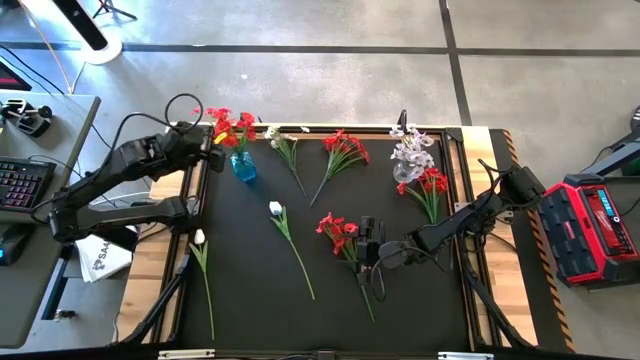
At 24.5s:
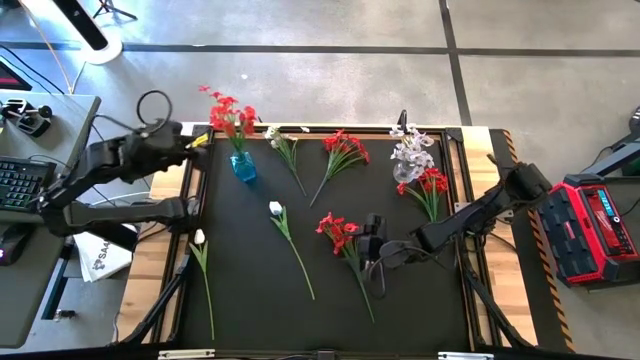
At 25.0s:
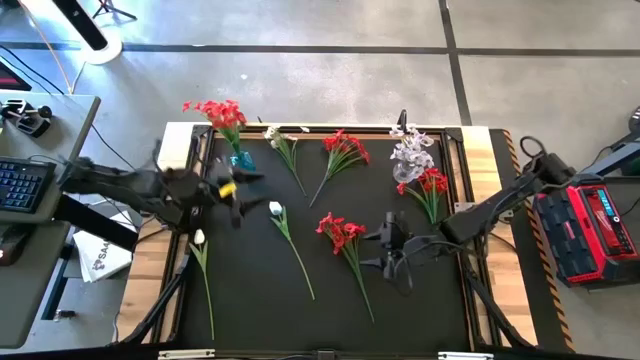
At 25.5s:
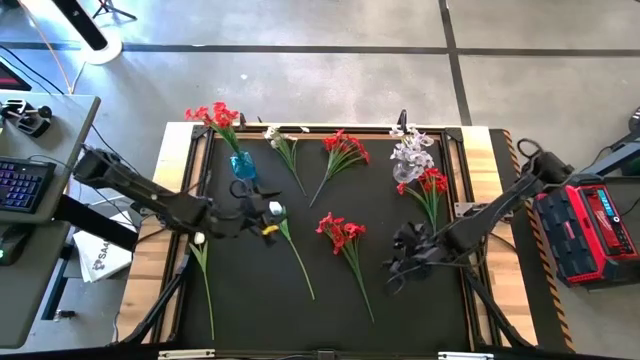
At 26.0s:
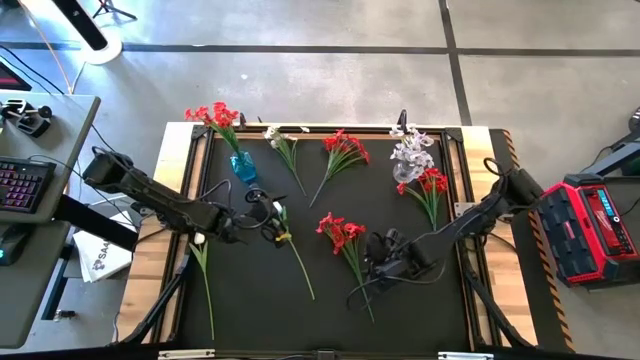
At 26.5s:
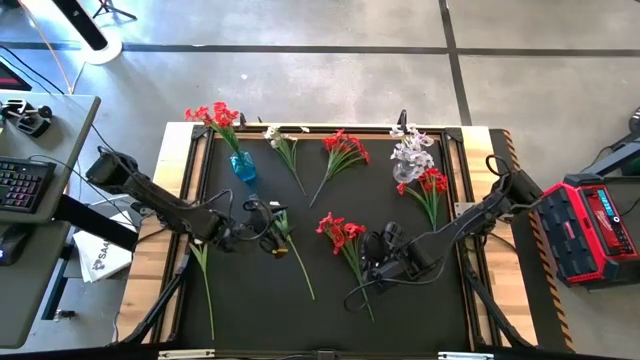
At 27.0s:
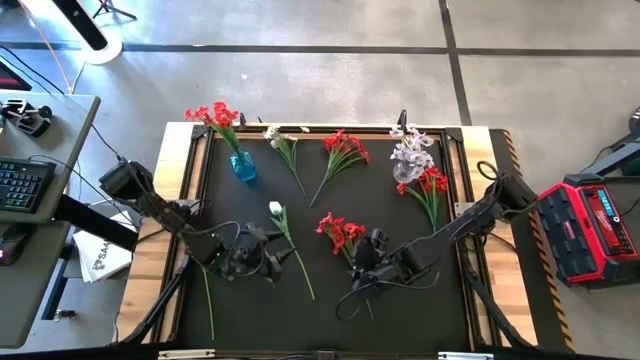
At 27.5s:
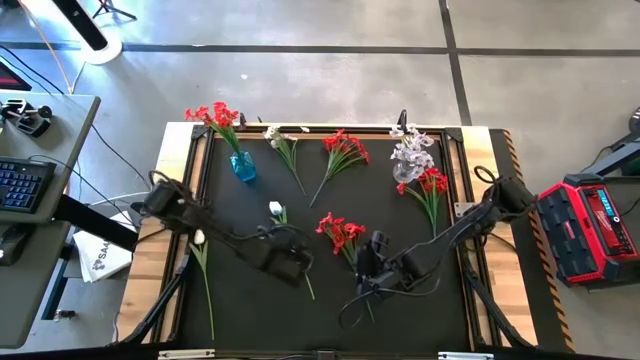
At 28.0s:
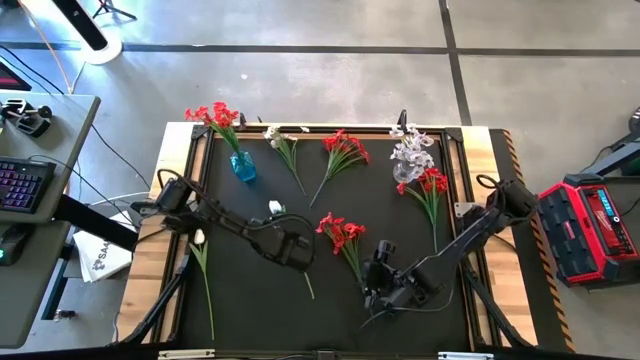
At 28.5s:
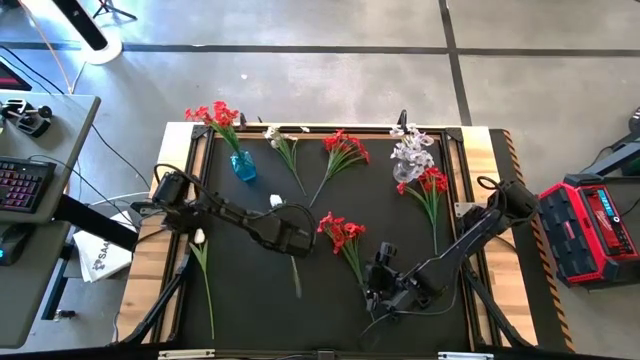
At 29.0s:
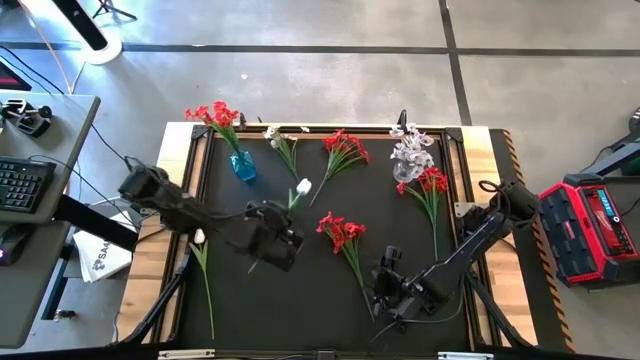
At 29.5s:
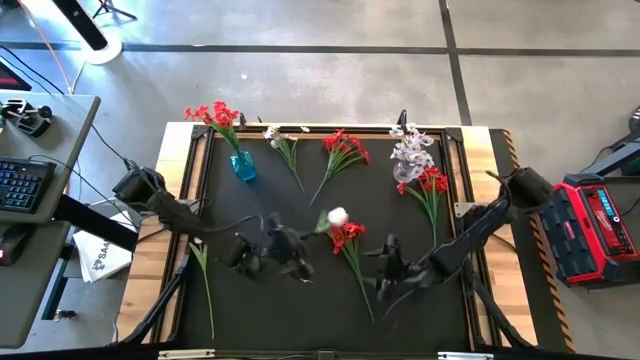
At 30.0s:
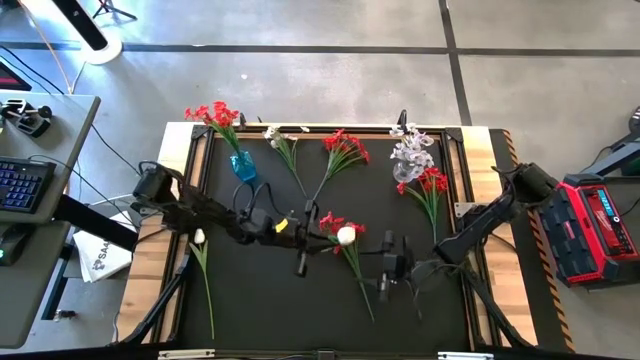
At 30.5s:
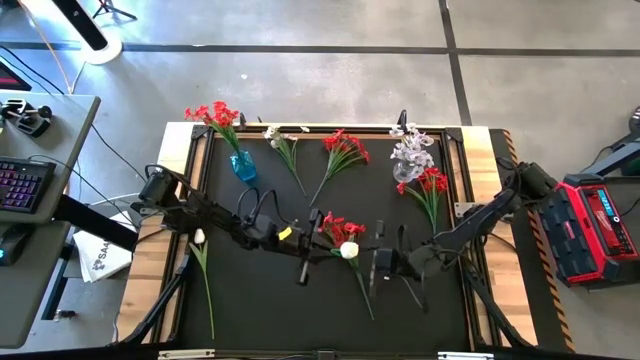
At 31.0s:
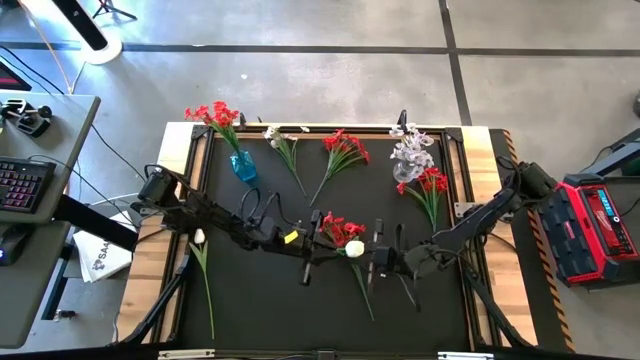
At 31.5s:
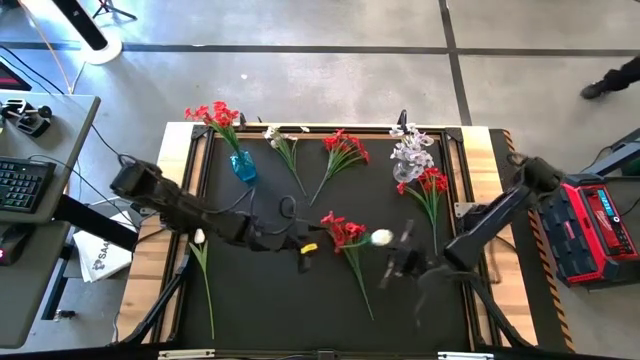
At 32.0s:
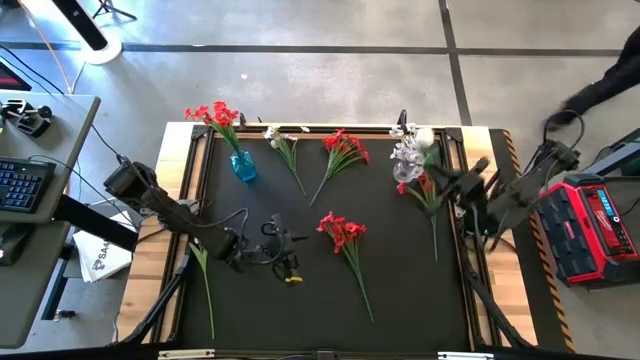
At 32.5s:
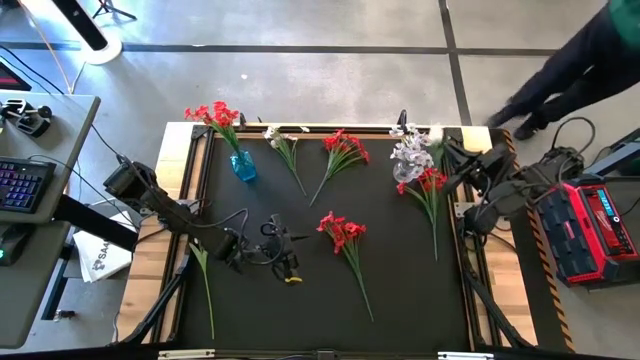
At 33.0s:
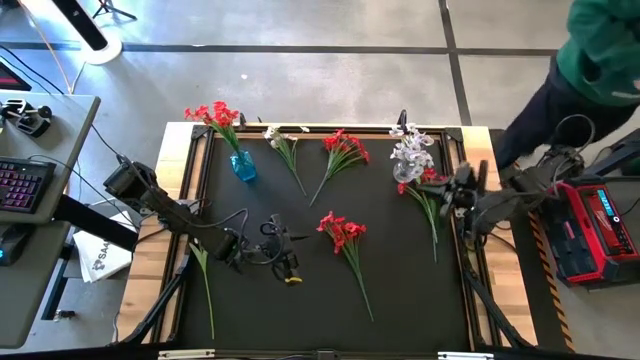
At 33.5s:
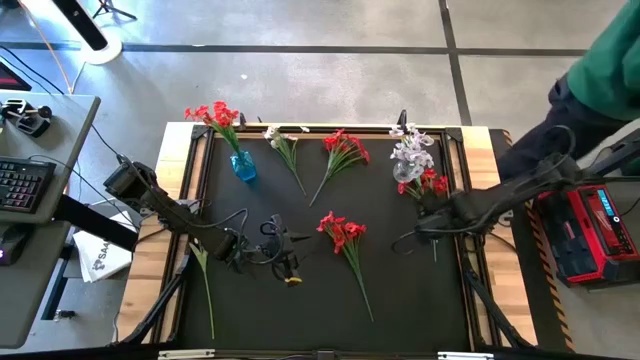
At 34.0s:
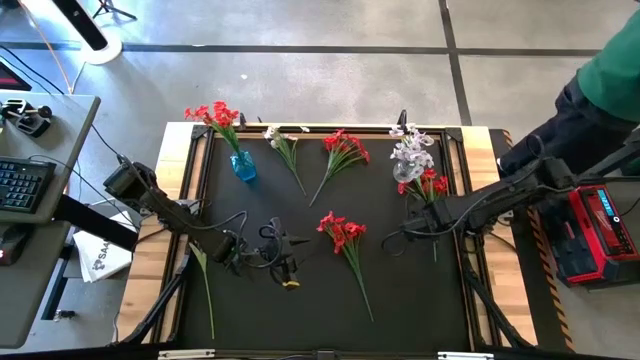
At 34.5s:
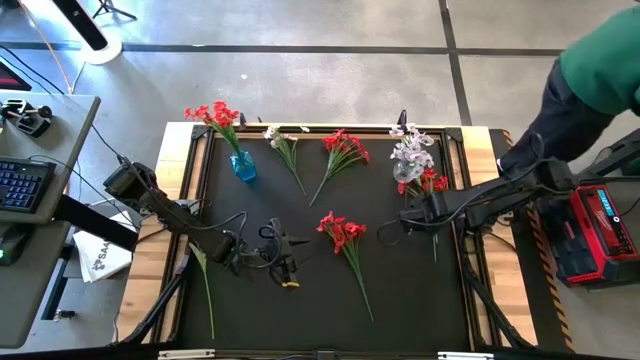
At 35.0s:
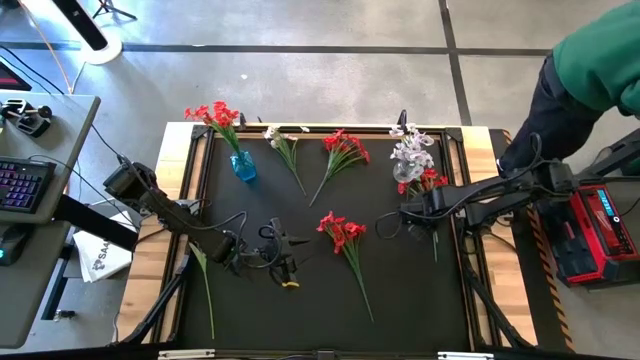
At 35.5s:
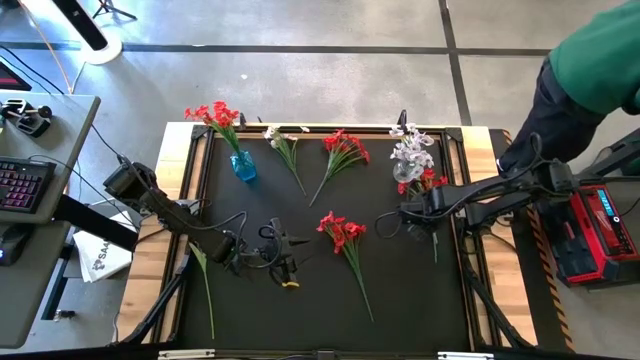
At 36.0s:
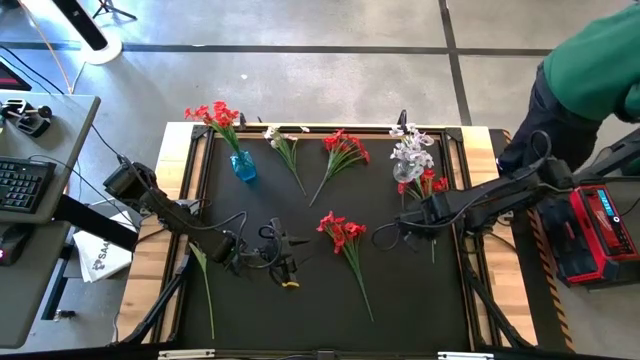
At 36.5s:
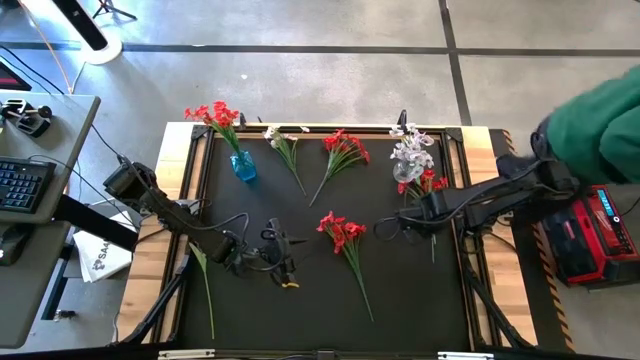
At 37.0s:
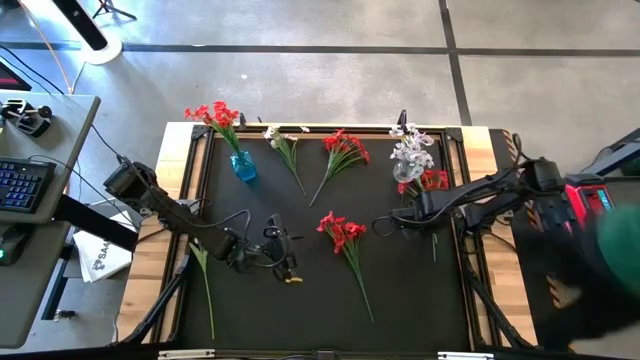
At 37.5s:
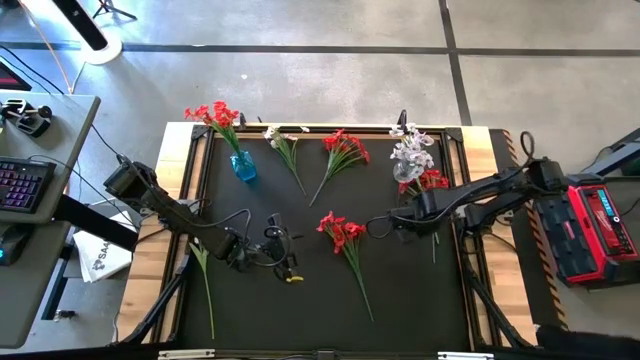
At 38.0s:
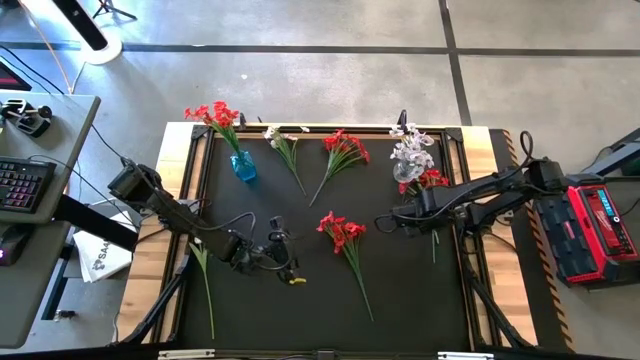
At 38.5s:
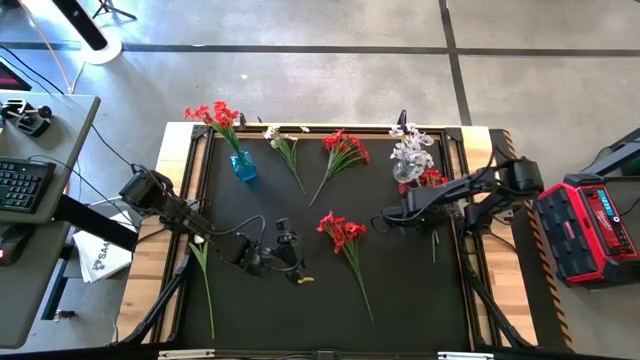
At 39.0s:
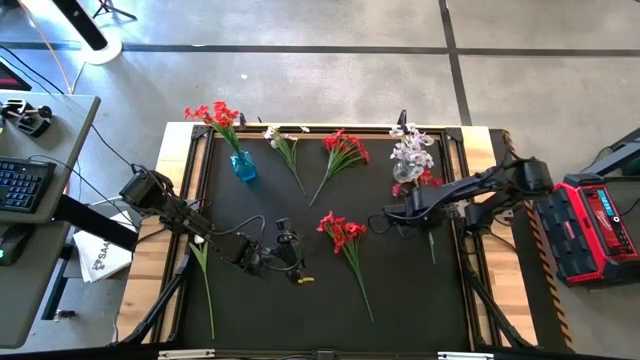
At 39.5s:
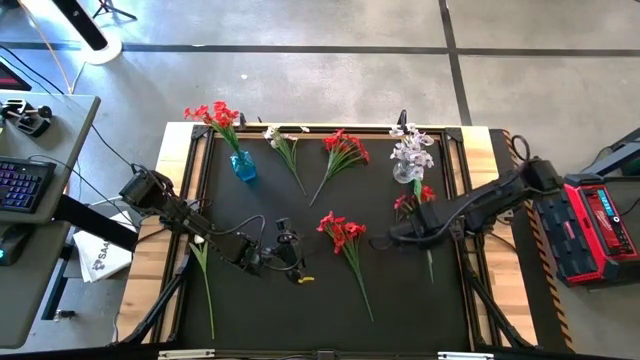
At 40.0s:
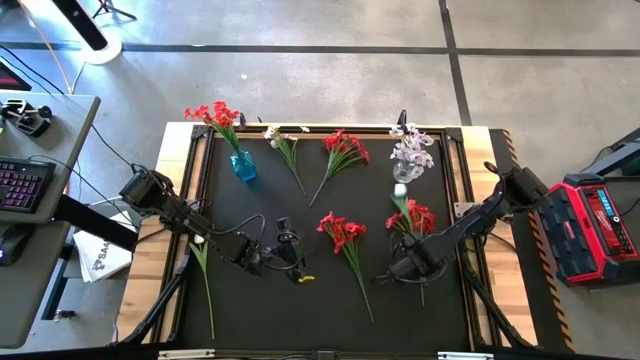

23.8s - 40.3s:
Task: Sort flowers into vase by color
Put the white flower into the transparent vase

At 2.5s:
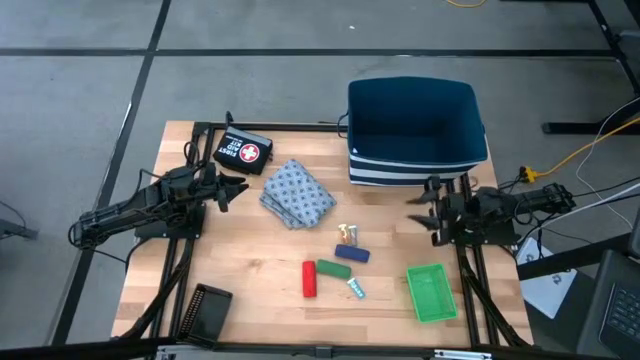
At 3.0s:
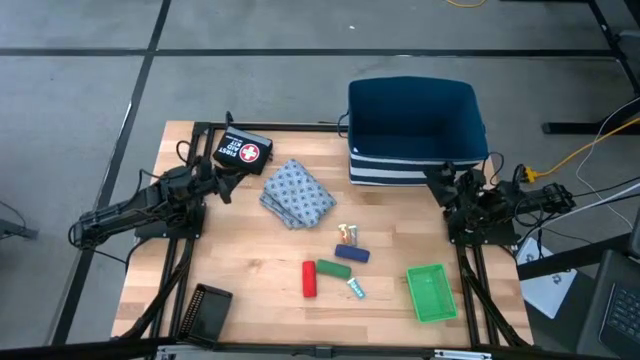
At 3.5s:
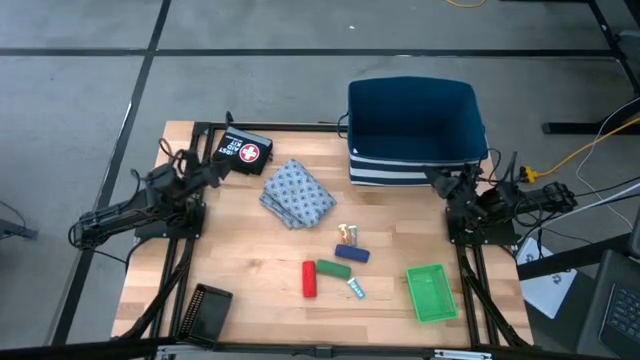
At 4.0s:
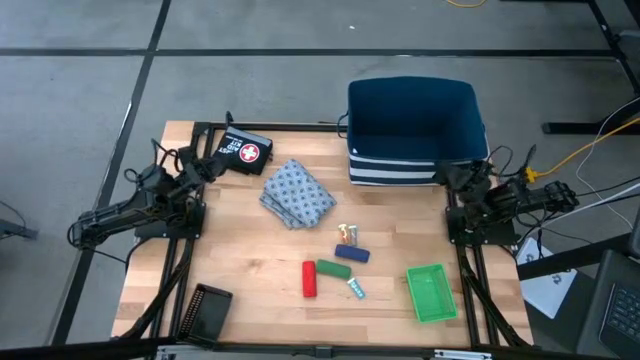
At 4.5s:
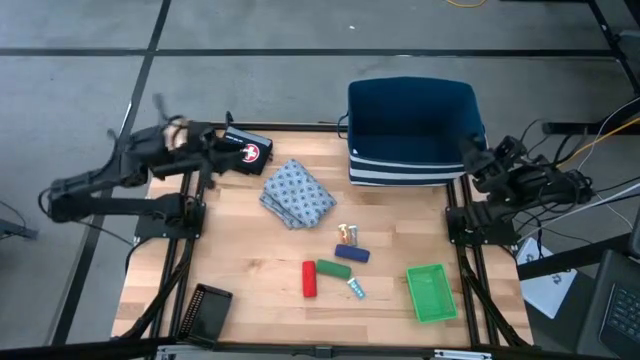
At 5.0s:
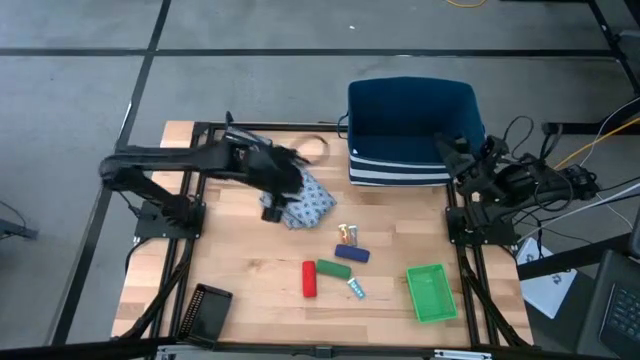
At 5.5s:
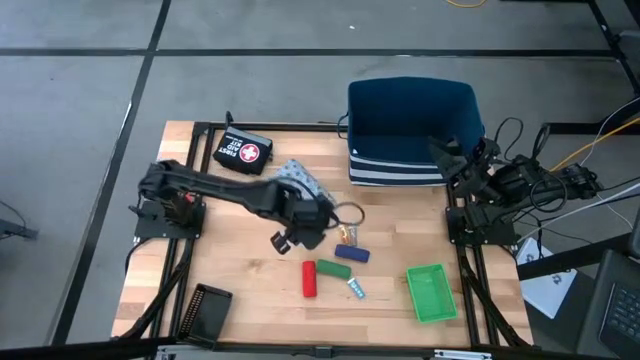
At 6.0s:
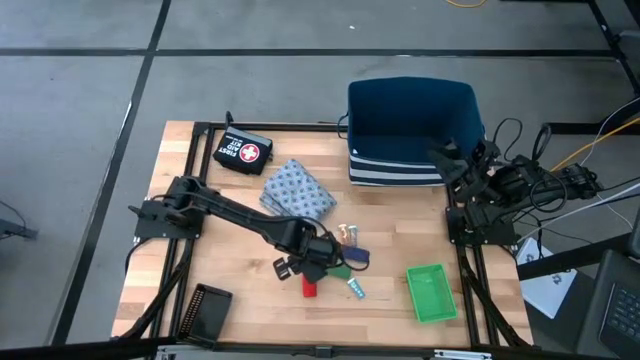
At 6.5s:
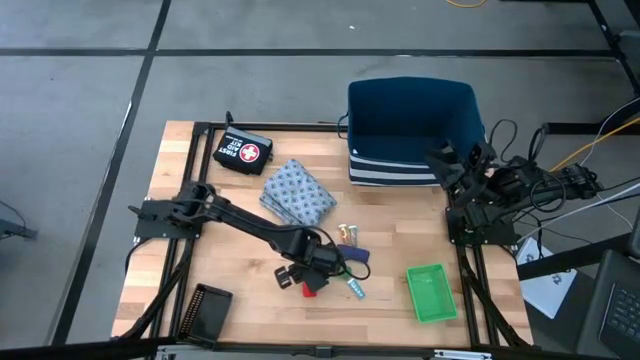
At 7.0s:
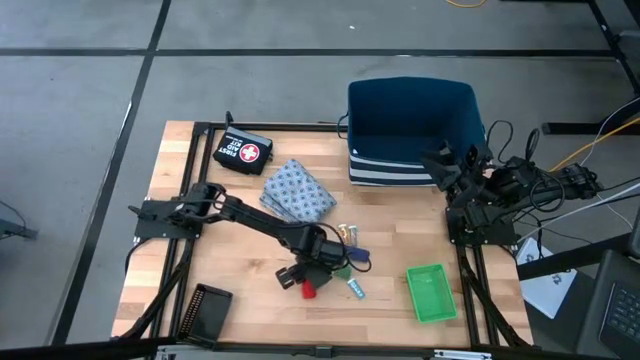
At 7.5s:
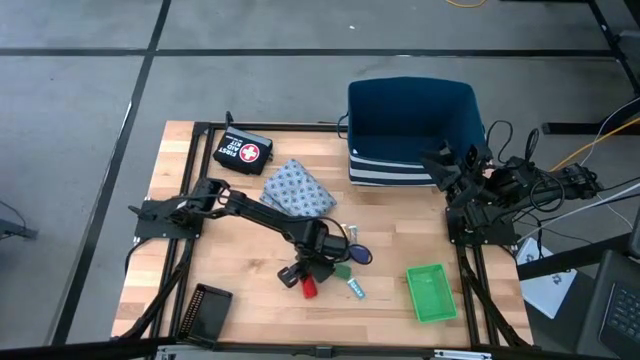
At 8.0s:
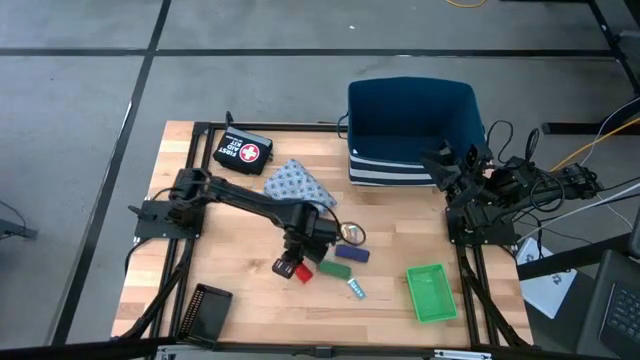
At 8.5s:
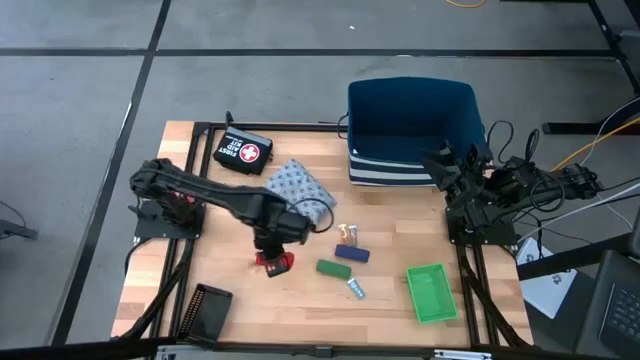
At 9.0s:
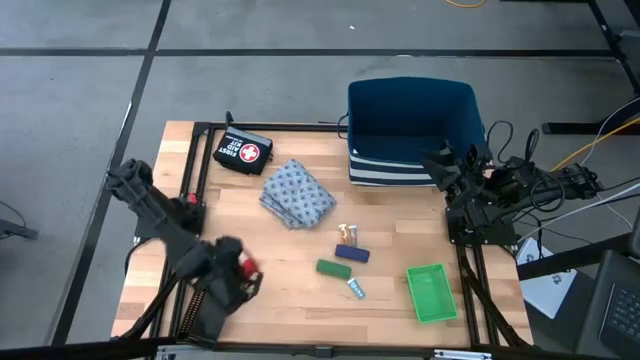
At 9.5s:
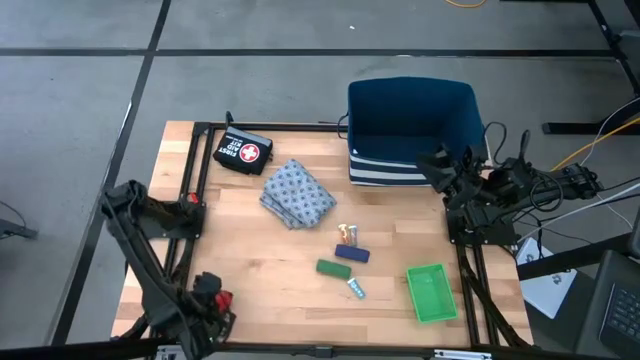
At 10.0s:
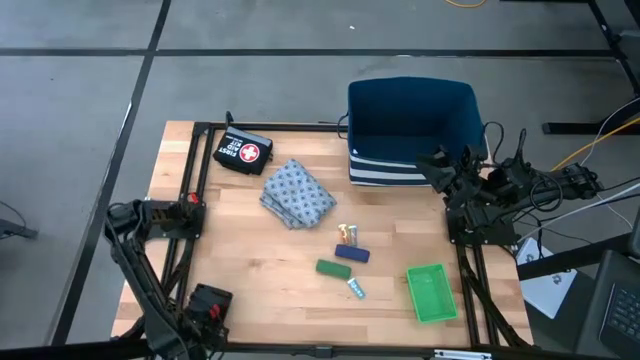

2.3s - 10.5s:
Task: Pick & place medical supplies in basket/bin
Put the red bandage into the black bin
